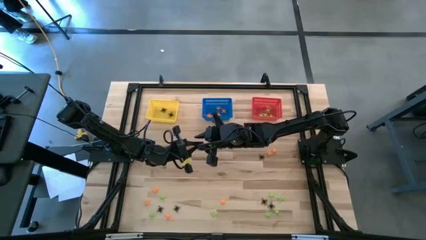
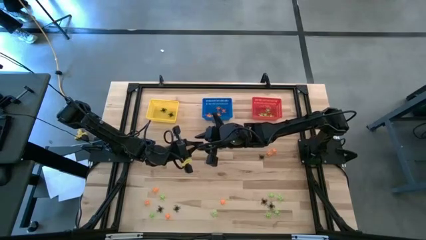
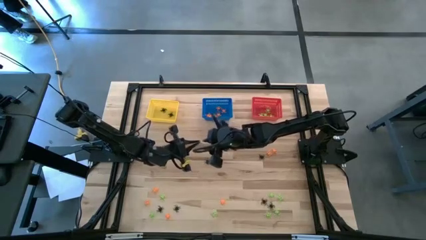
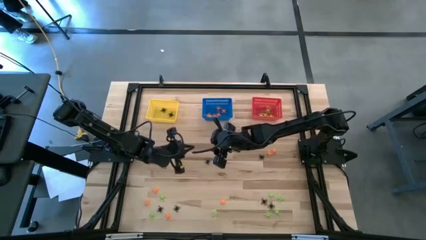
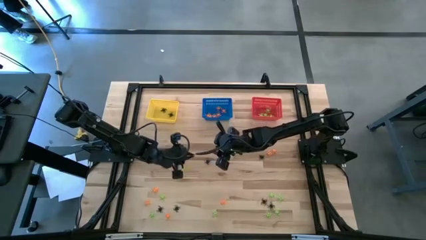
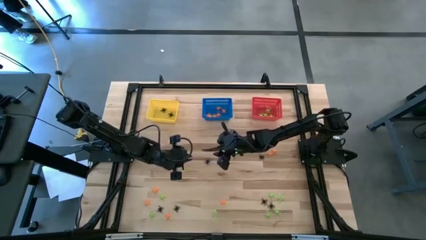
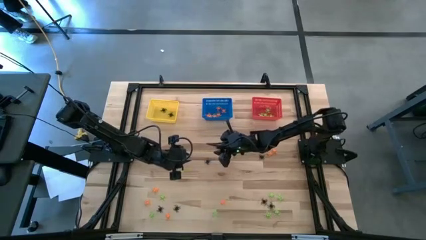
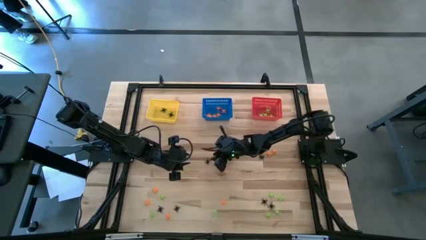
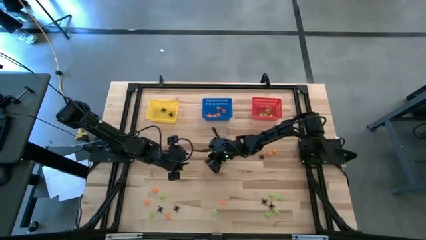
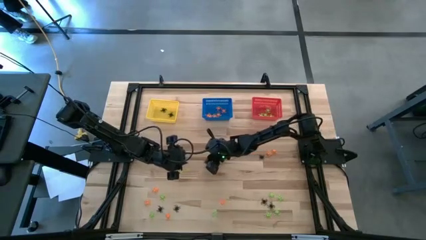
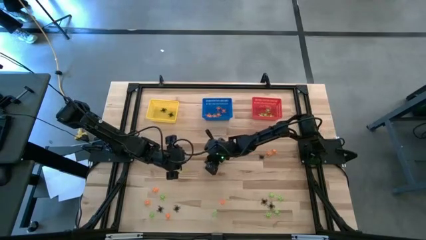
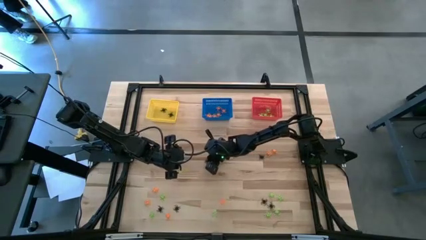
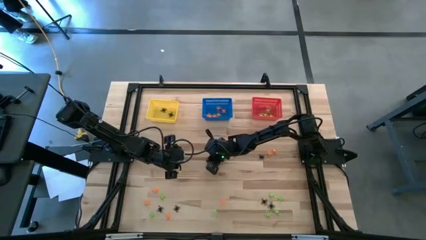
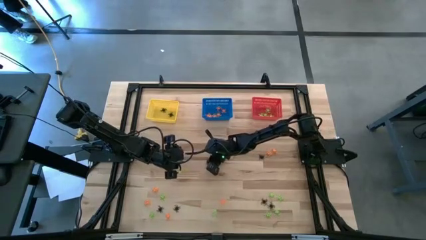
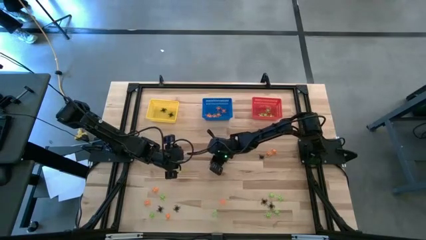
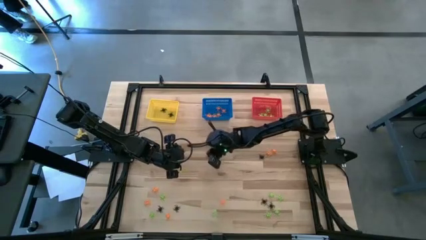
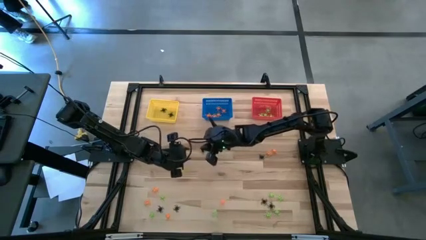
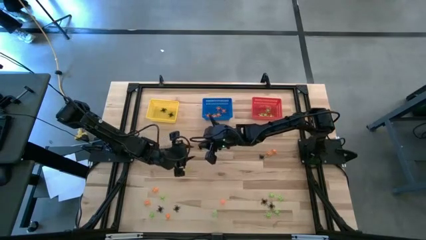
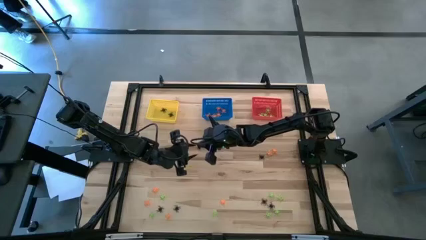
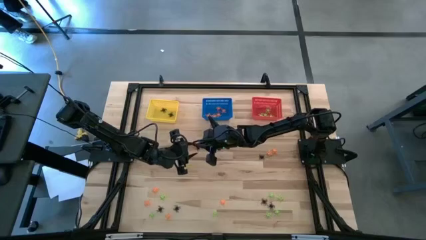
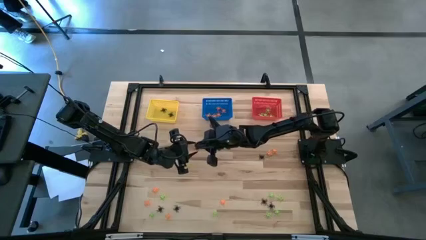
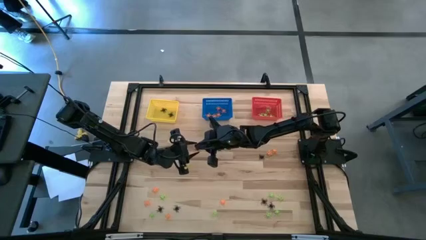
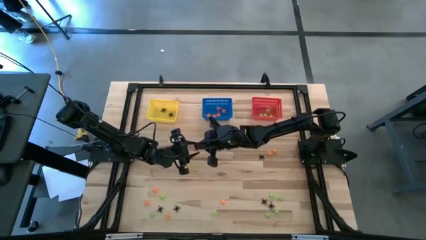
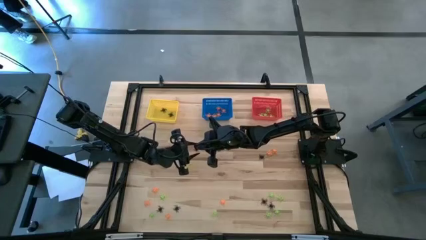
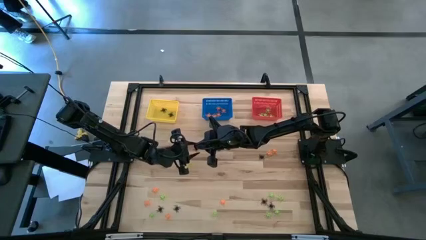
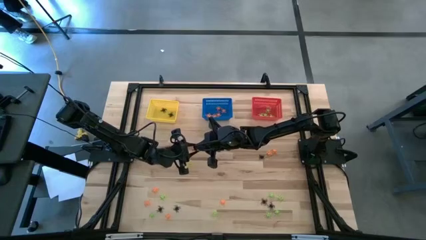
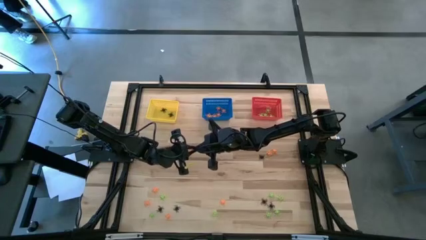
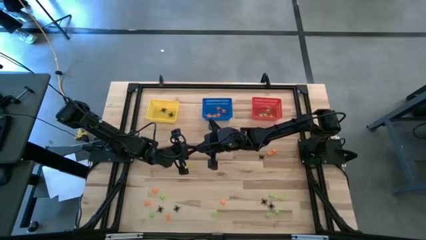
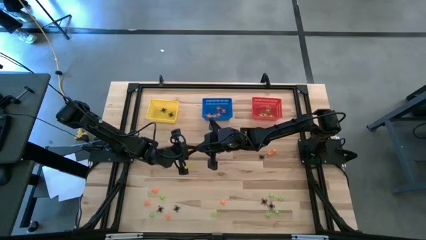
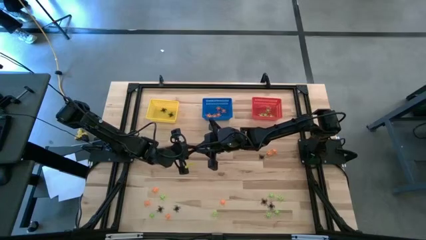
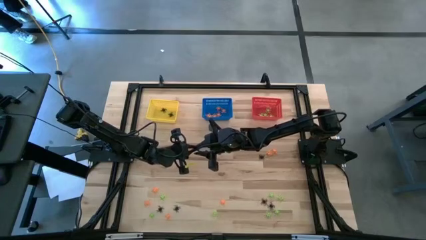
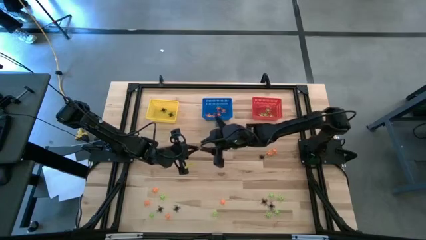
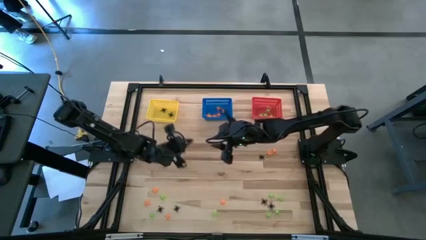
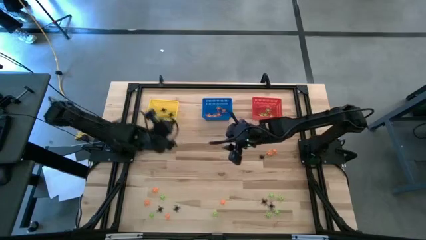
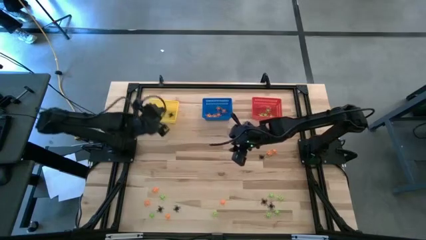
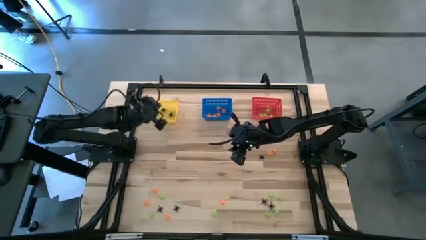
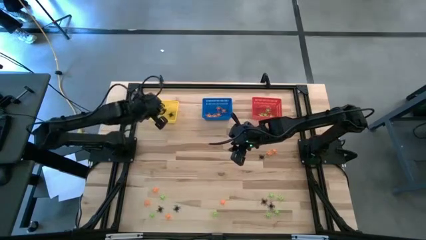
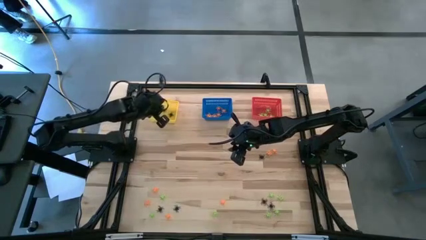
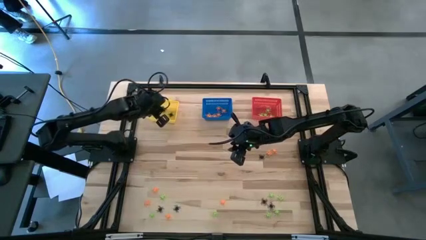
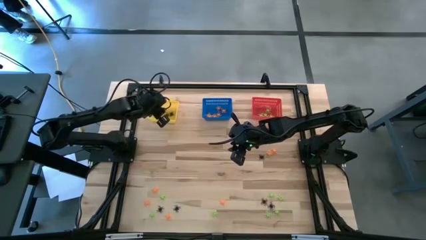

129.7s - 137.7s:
Task: Sort Halloween decoration
Put the black spider toy into the yellow basket

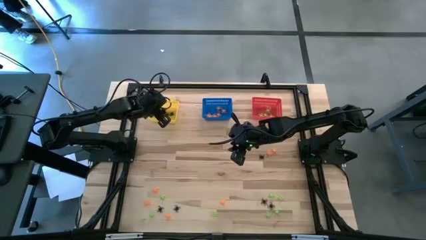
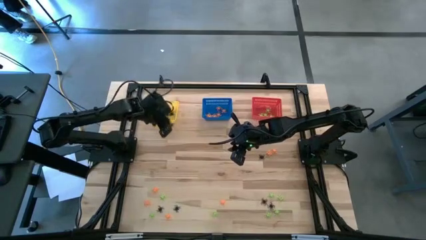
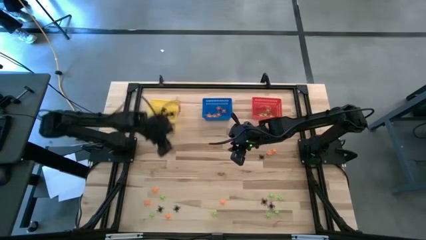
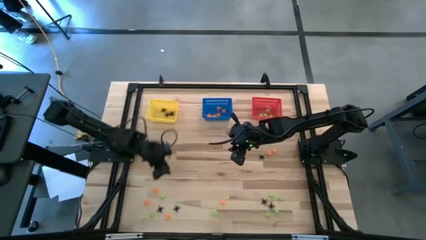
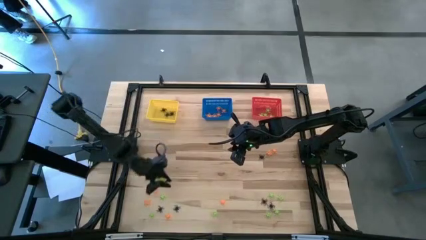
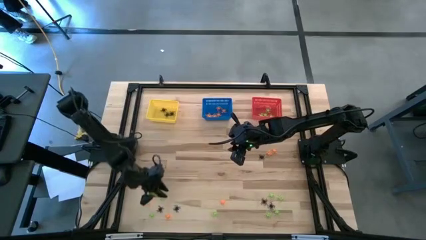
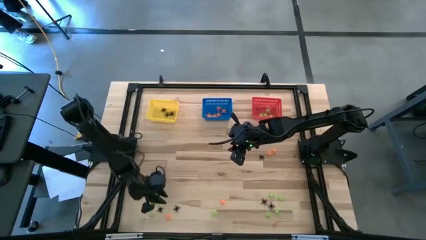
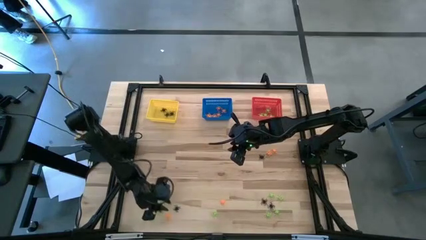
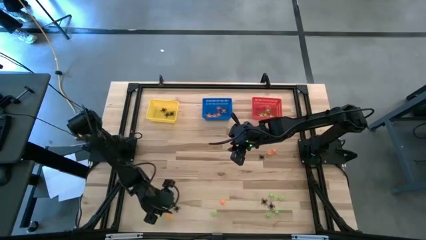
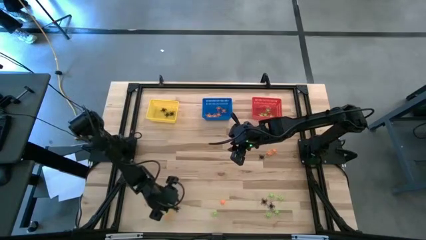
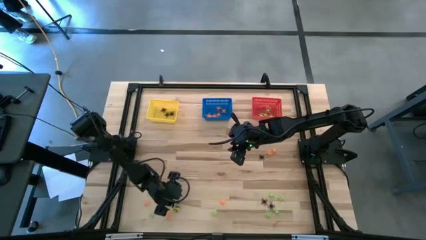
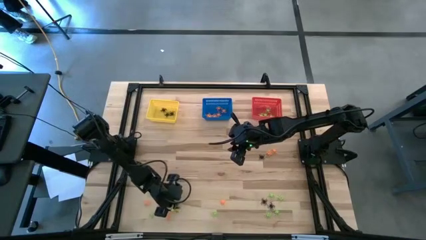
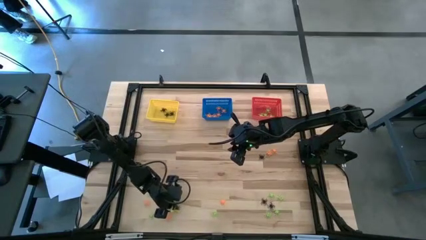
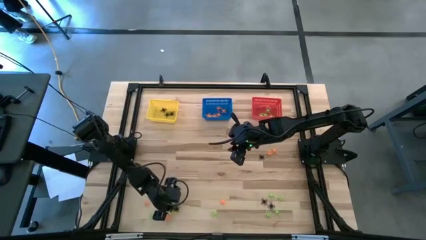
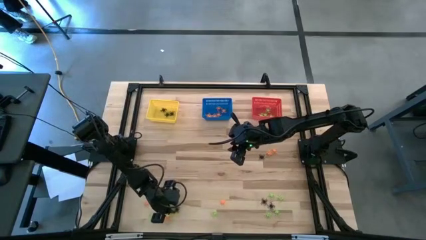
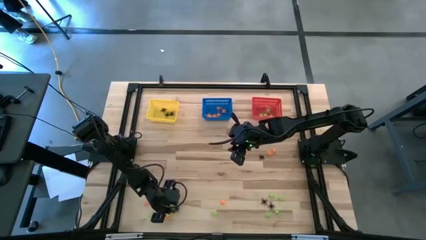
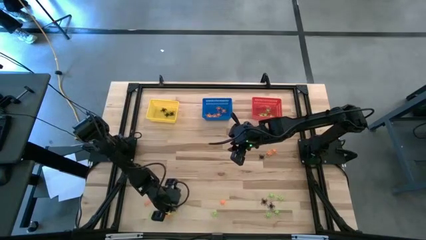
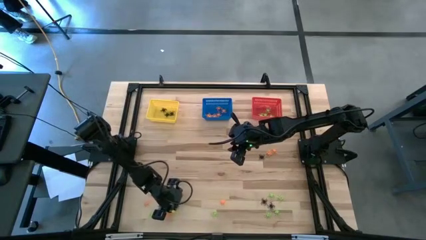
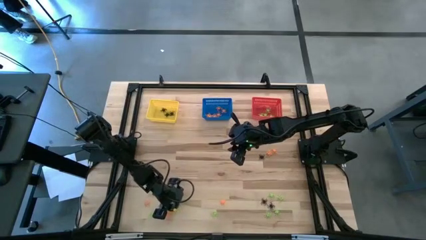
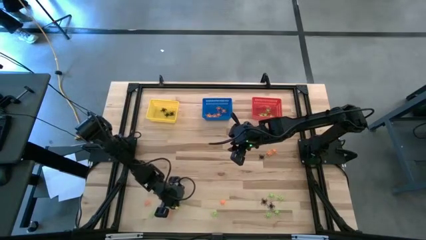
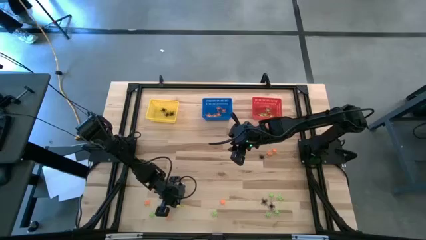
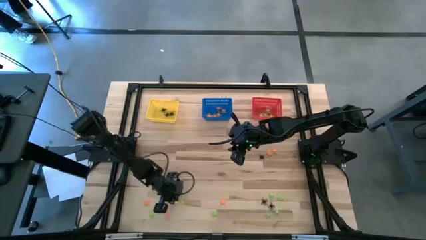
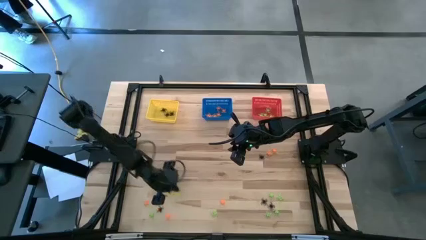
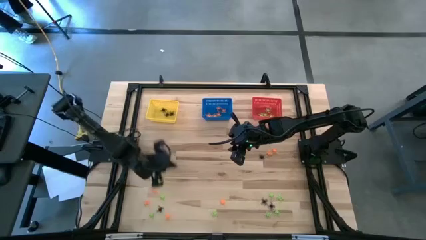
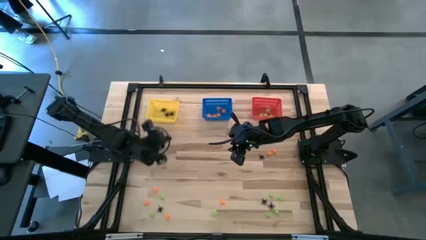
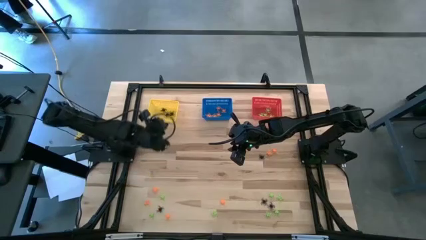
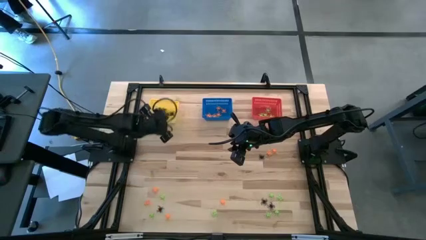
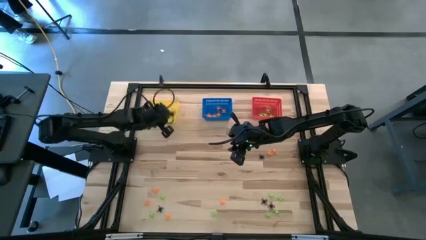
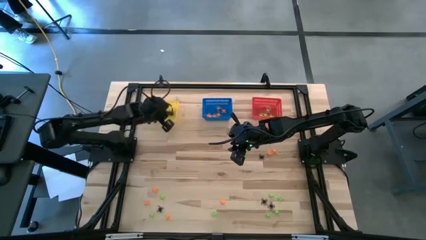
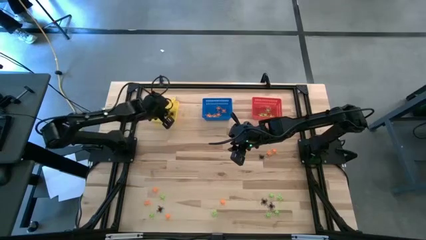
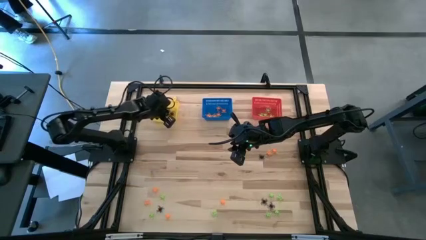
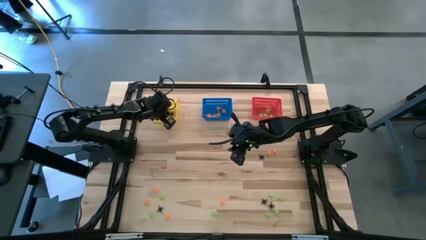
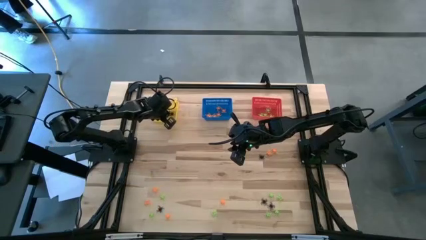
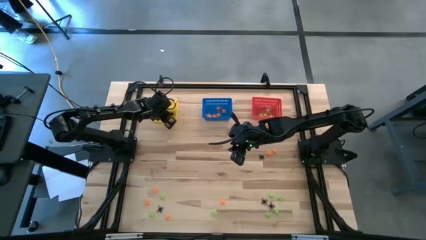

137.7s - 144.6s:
Put the black spider toy into the yellow basket
